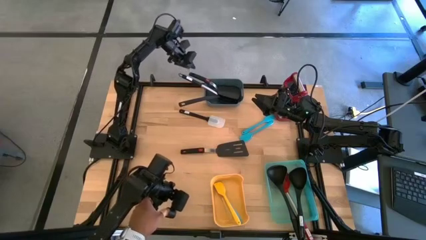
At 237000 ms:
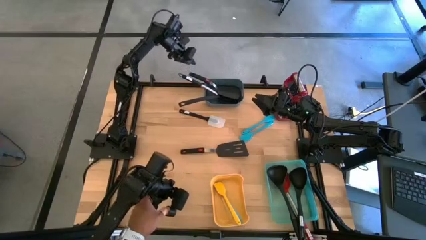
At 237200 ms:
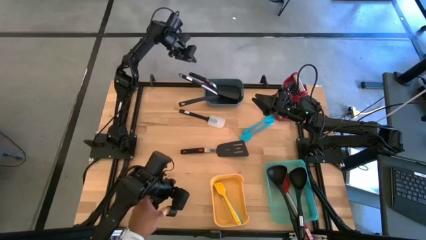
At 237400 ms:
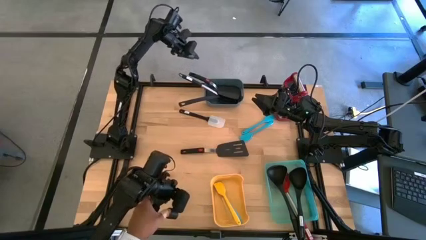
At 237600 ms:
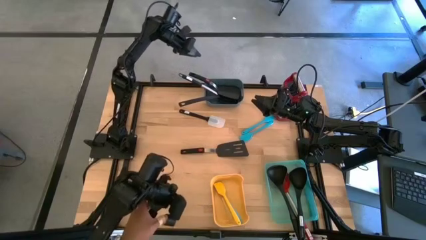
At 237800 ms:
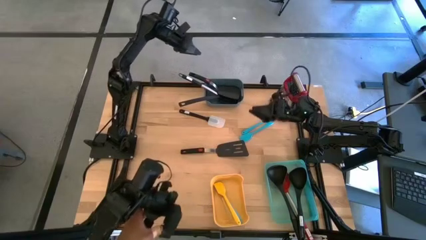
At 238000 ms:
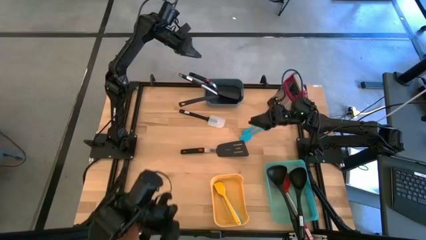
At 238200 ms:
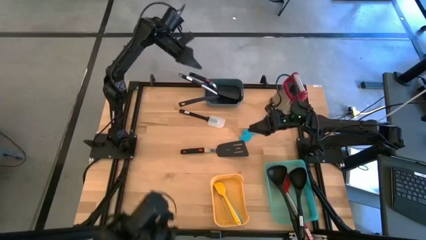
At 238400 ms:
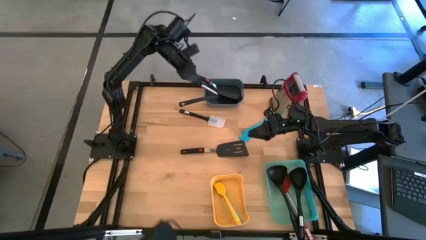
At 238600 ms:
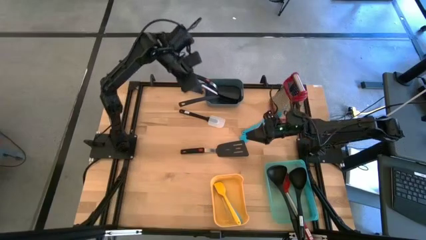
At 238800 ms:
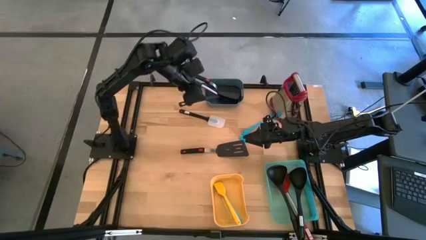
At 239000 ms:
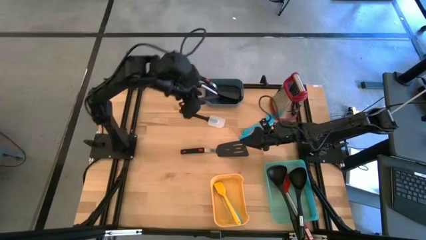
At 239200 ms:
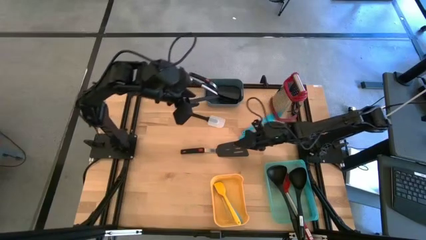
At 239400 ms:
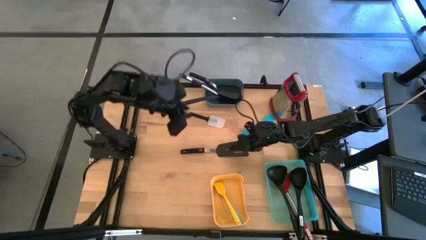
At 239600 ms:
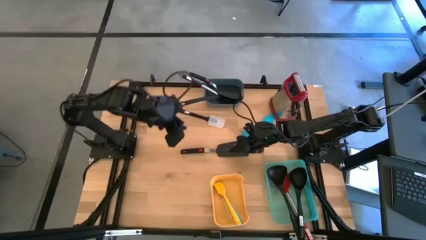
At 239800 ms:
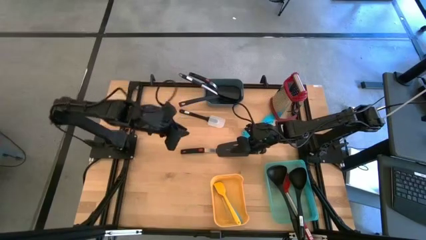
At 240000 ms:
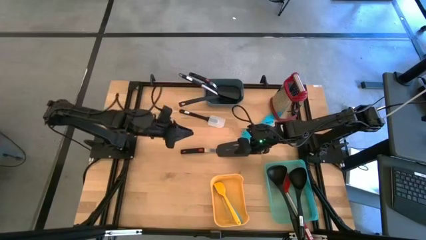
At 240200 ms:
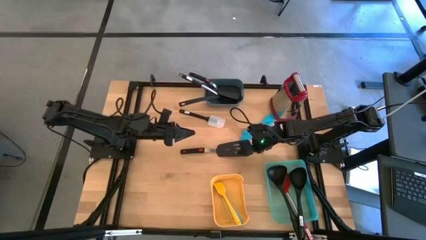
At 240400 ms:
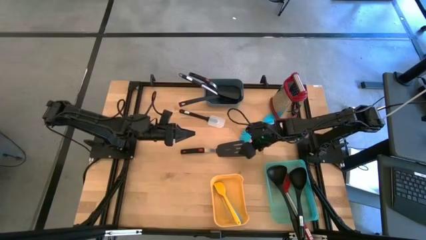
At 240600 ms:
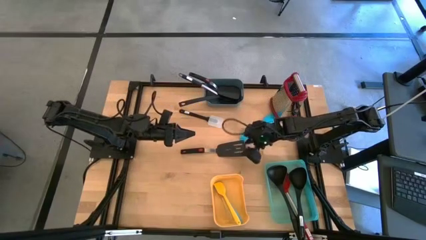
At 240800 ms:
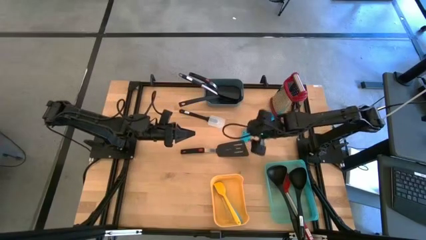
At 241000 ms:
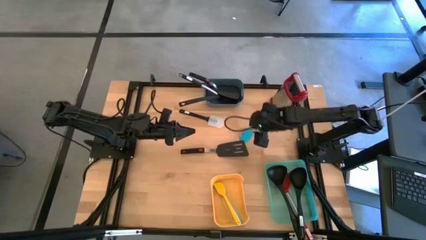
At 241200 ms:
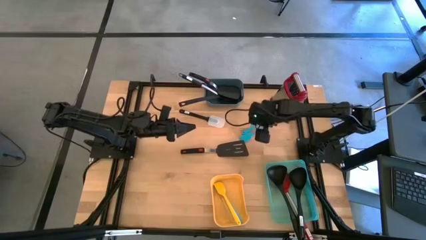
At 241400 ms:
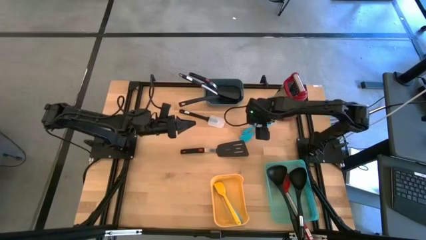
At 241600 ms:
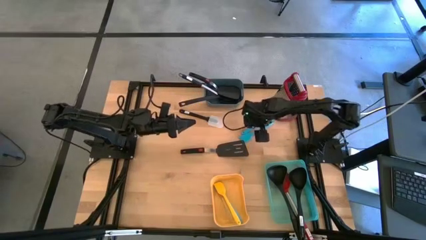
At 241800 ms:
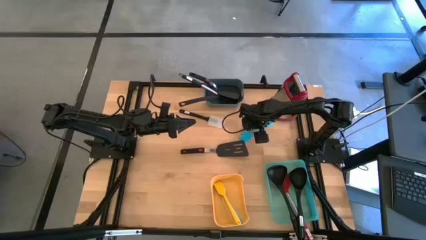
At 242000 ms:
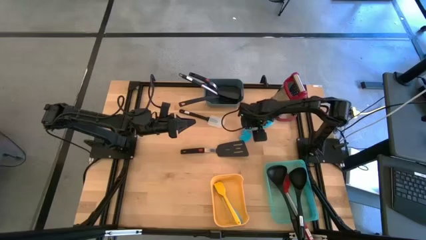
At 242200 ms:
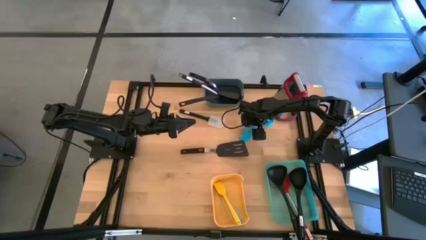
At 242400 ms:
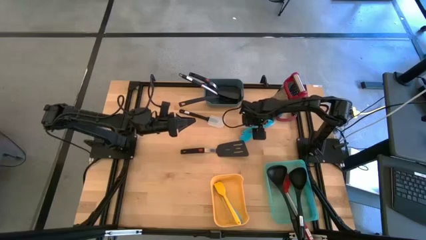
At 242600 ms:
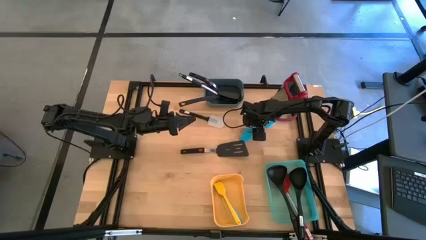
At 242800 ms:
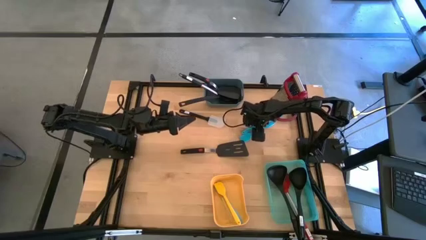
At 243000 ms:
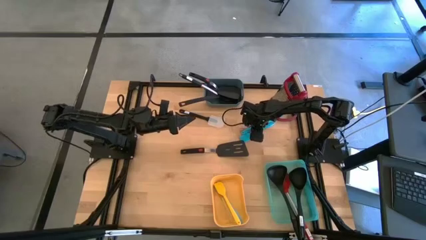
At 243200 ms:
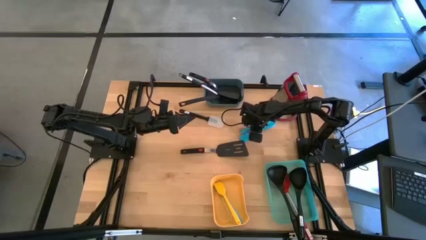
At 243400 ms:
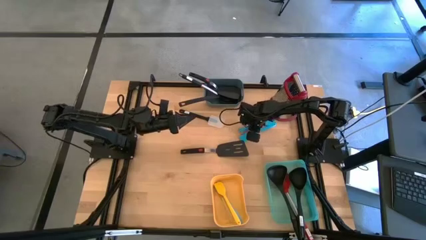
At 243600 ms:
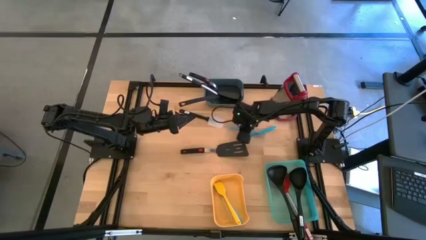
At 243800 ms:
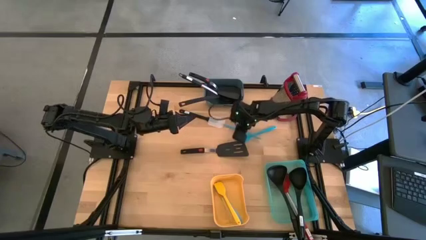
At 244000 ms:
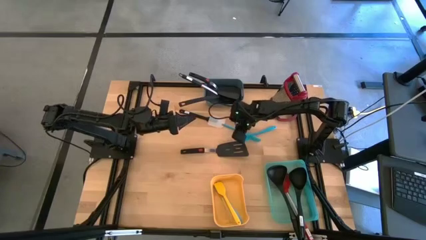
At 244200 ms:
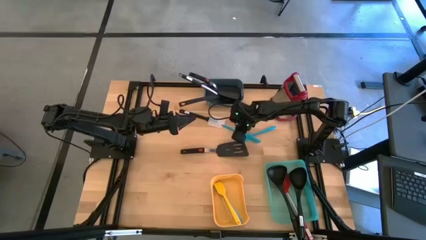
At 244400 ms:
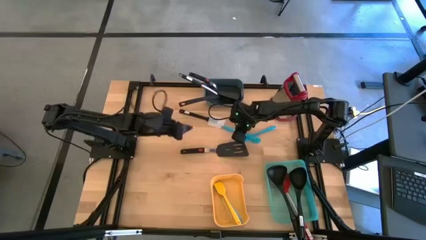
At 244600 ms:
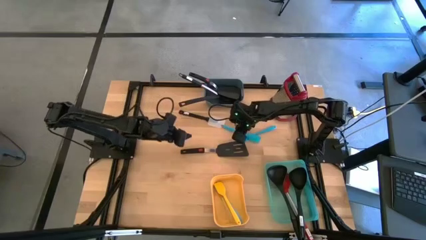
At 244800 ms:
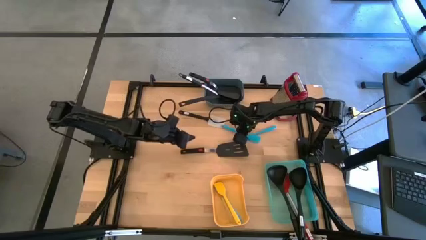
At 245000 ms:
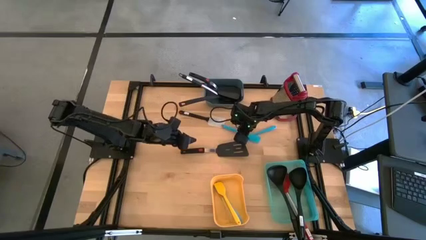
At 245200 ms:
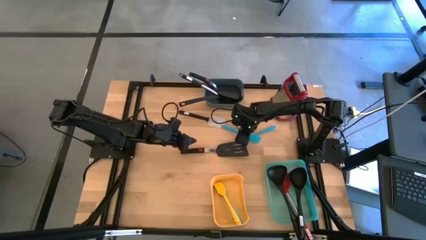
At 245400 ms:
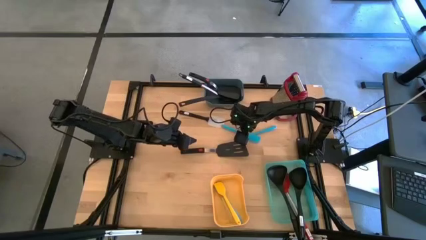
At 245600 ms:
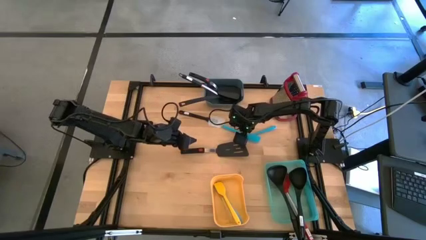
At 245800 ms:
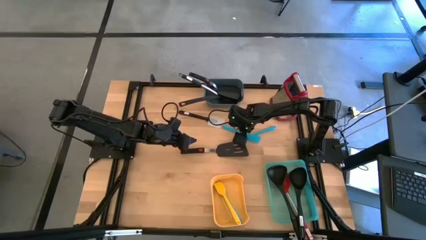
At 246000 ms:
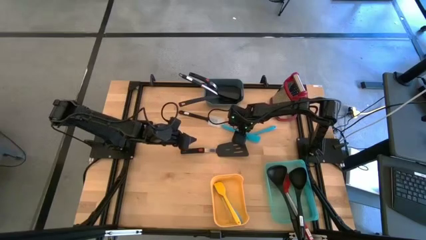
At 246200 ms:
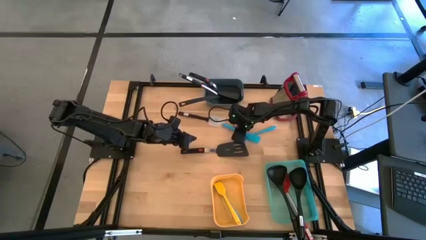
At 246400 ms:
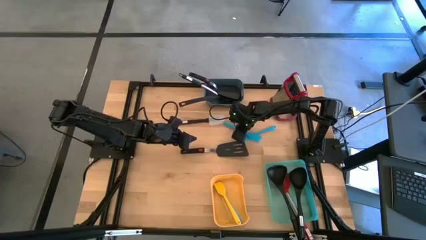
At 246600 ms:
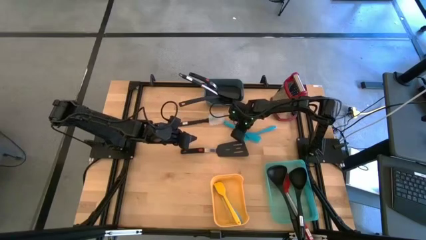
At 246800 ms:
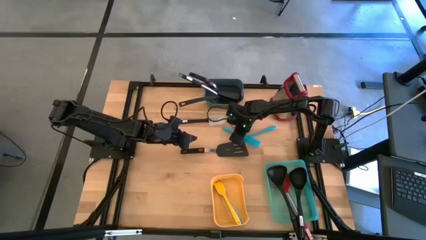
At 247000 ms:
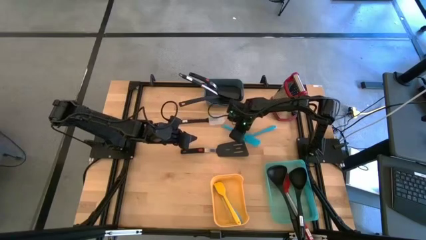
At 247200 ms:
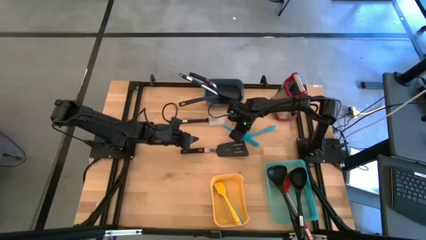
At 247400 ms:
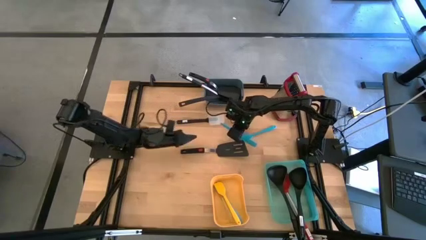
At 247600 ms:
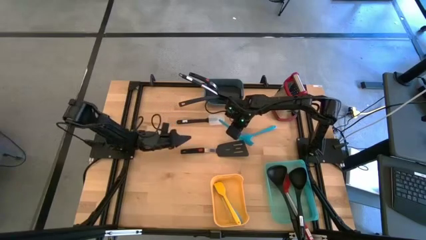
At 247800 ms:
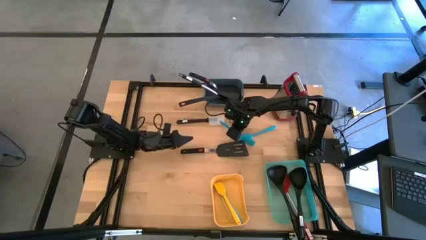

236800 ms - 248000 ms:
Task: Pick & Place Kitchen Items
Put the small blue spatula into the yellow bin

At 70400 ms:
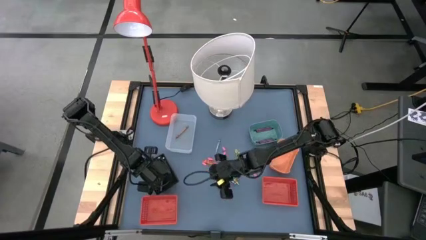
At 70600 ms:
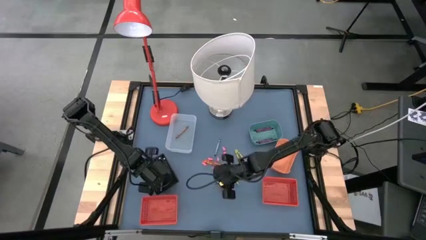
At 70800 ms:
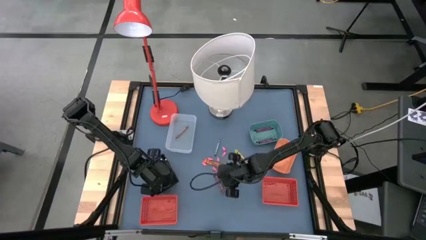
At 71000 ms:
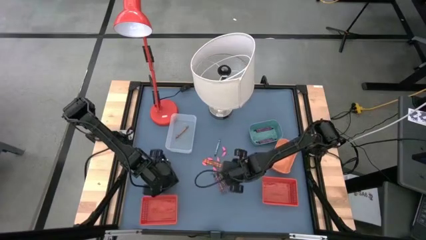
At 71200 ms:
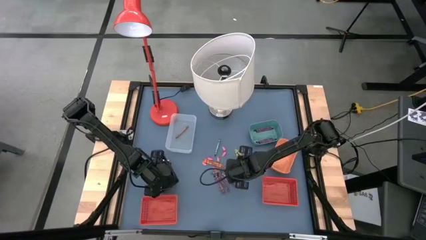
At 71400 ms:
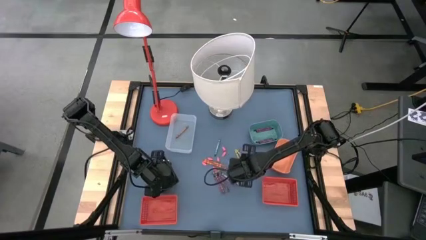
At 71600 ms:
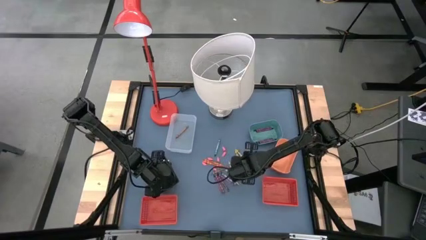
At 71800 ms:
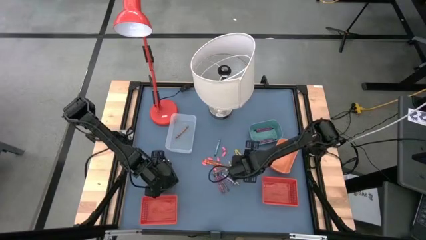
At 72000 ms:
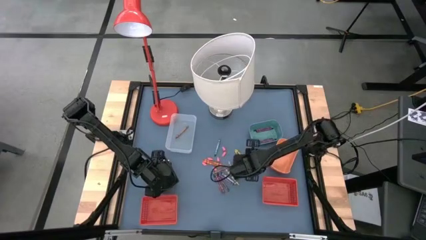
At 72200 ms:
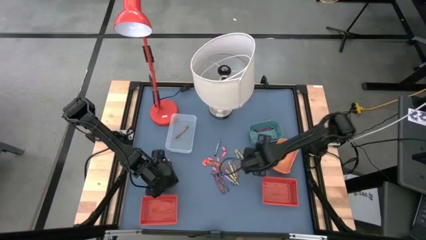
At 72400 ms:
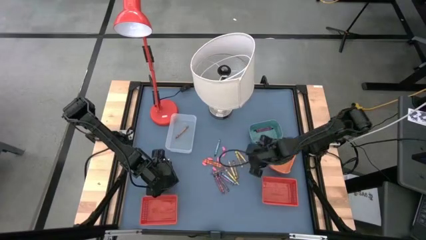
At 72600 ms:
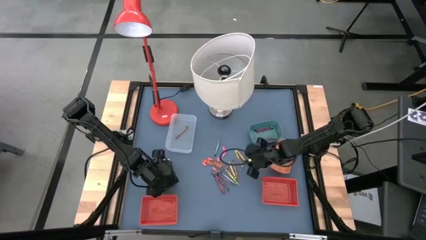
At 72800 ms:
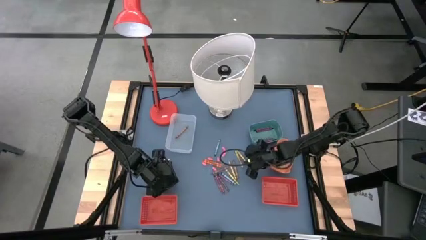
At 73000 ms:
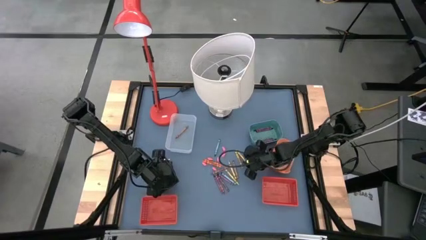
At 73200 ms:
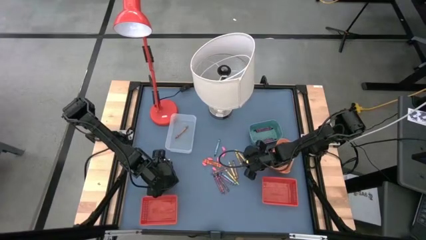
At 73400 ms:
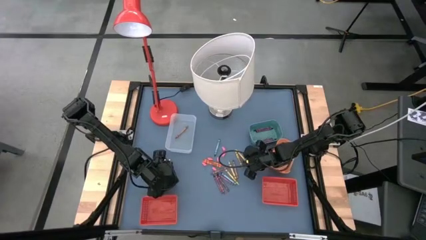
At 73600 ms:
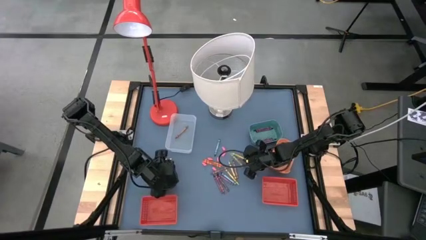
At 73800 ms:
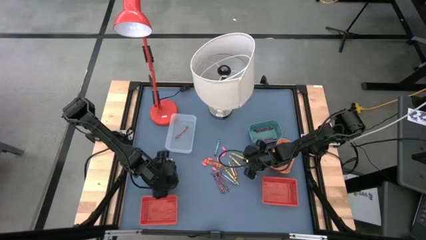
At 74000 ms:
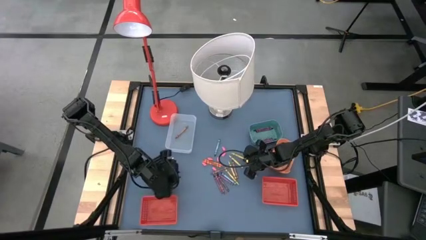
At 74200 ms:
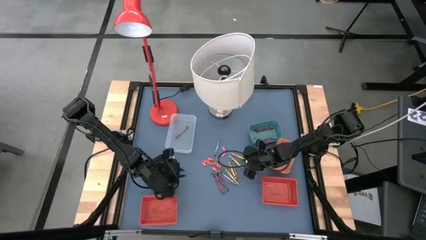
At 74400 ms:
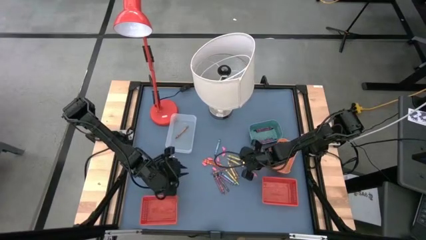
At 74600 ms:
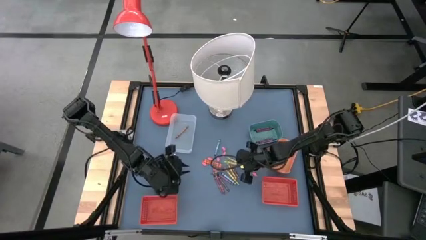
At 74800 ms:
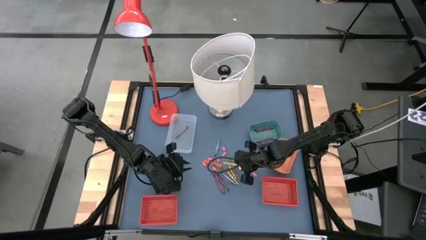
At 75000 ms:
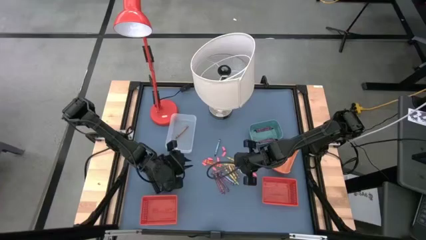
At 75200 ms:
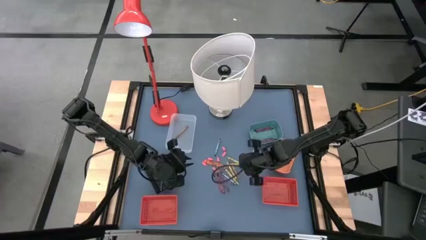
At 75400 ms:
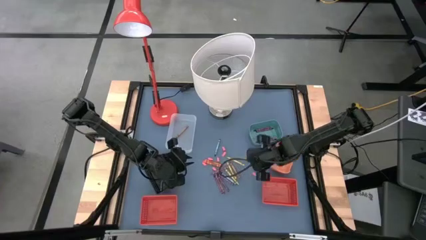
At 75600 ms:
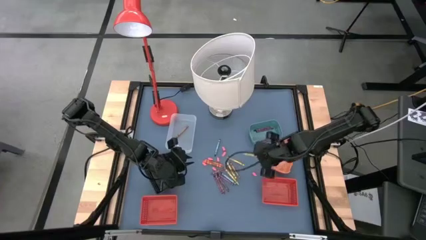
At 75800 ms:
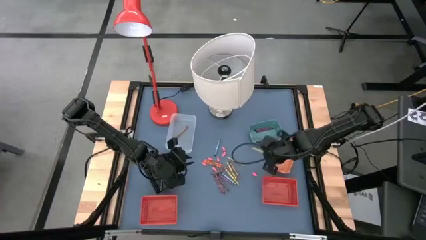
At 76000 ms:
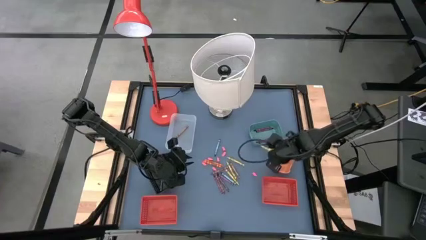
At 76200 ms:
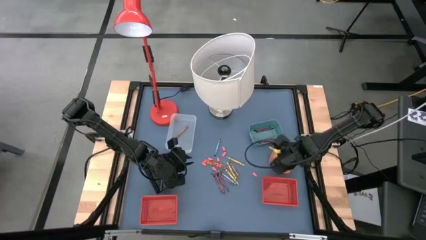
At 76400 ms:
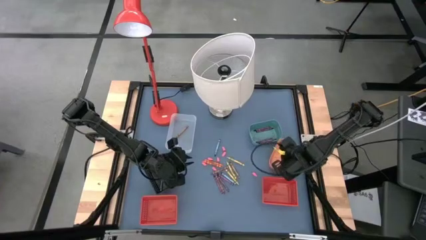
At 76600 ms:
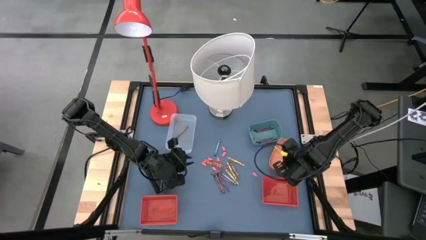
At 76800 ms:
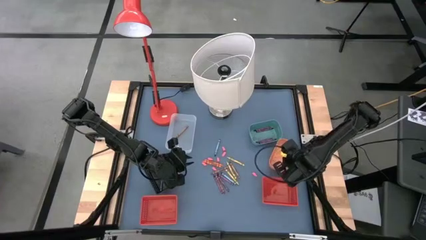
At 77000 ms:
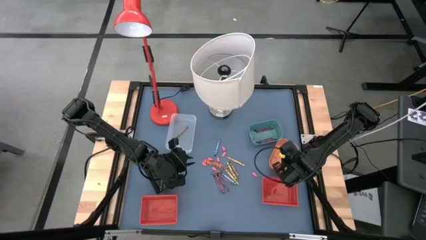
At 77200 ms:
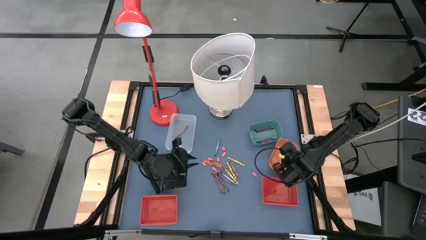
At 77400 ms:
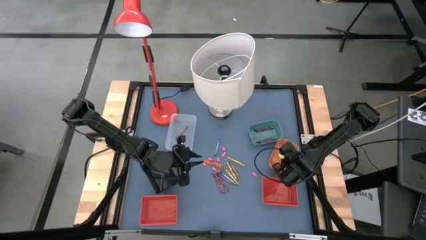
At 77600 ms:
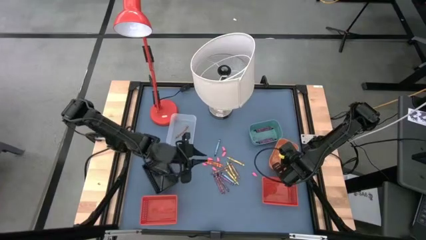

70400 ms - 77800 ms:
Task: Sort crayons
Put the yellow crayon into the orange bin
